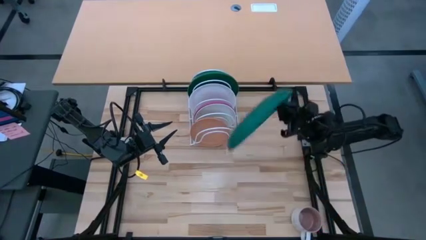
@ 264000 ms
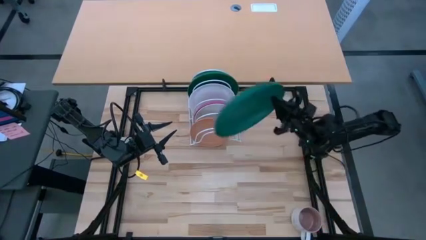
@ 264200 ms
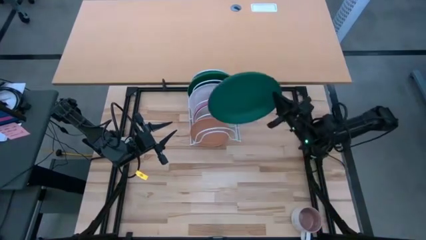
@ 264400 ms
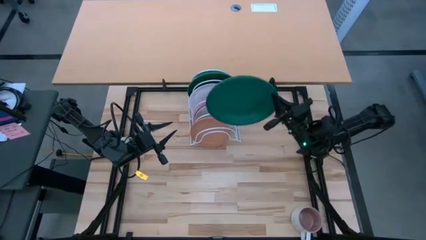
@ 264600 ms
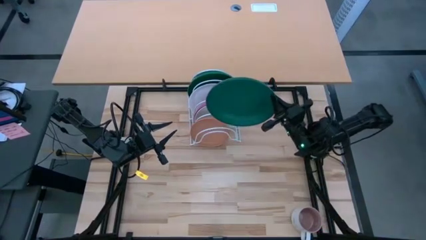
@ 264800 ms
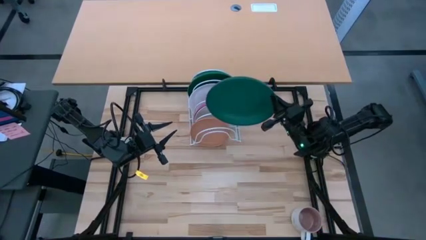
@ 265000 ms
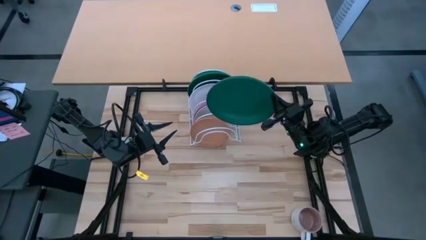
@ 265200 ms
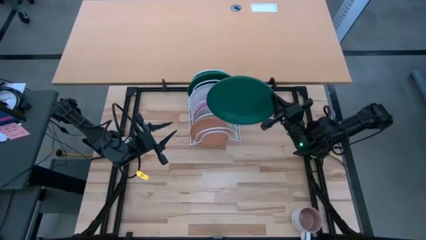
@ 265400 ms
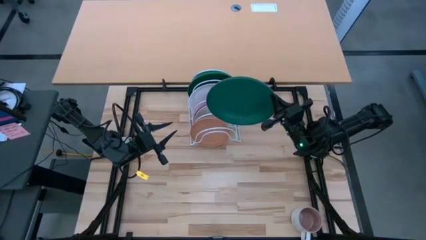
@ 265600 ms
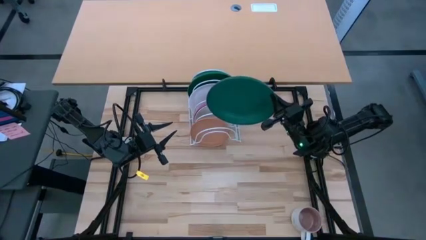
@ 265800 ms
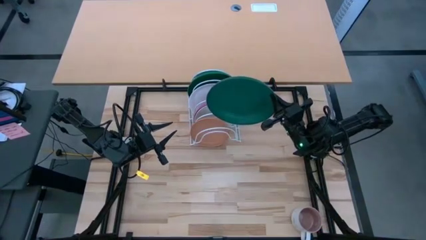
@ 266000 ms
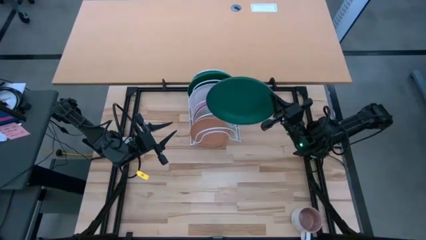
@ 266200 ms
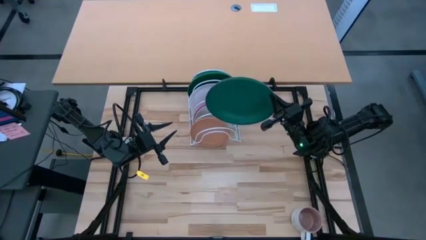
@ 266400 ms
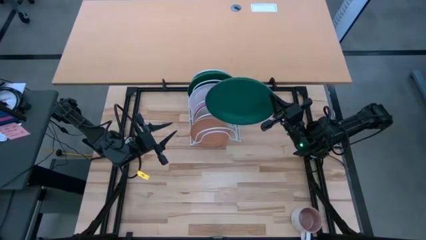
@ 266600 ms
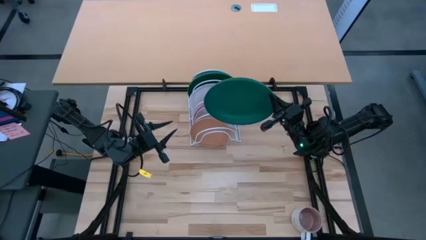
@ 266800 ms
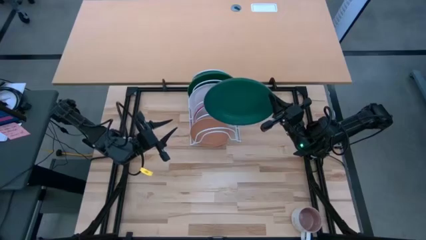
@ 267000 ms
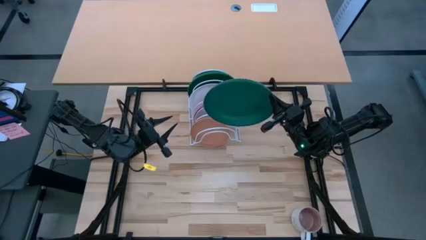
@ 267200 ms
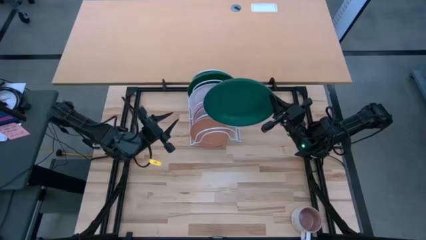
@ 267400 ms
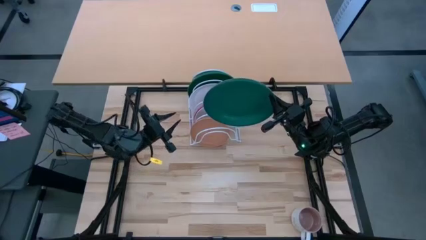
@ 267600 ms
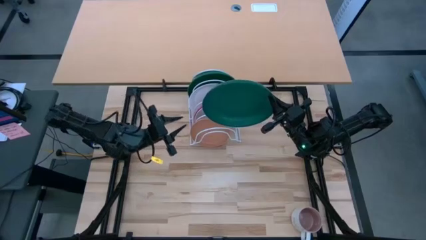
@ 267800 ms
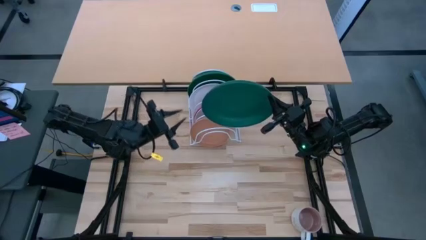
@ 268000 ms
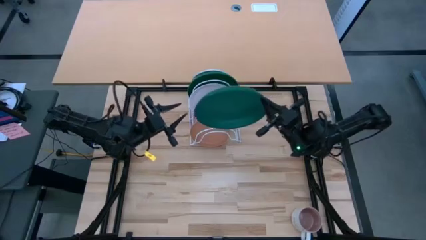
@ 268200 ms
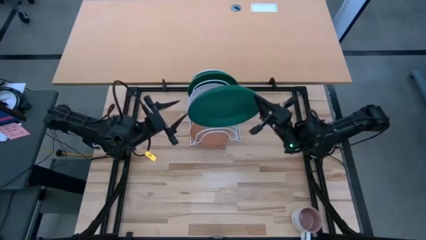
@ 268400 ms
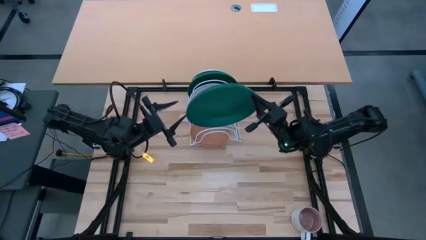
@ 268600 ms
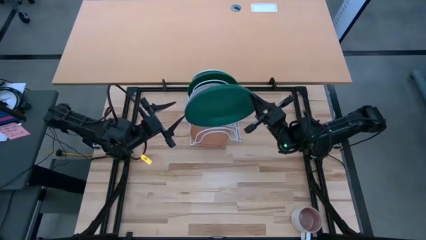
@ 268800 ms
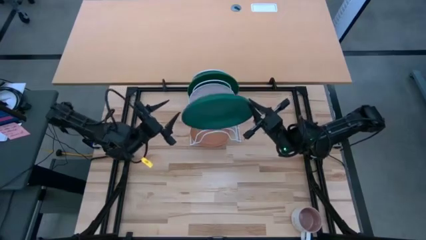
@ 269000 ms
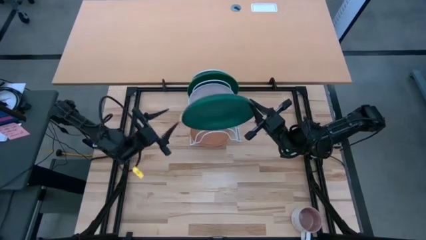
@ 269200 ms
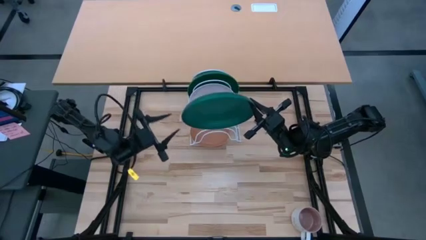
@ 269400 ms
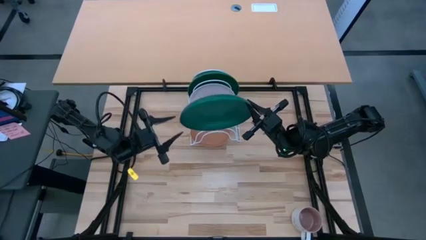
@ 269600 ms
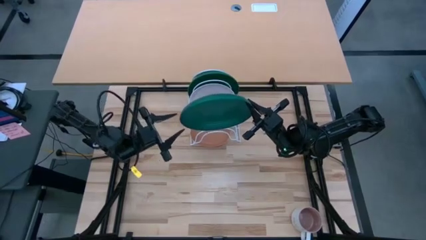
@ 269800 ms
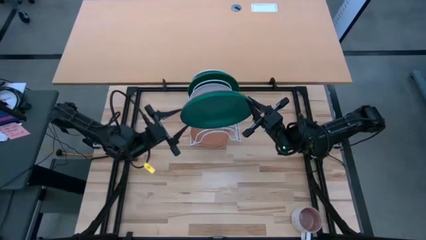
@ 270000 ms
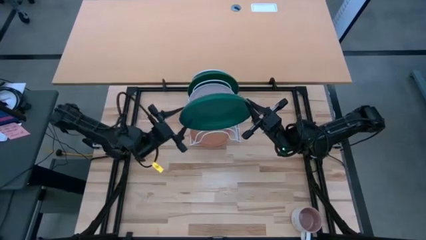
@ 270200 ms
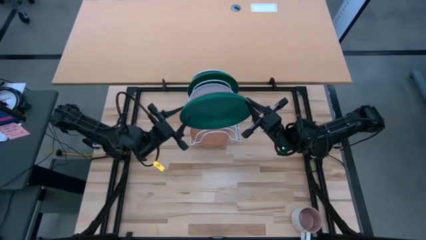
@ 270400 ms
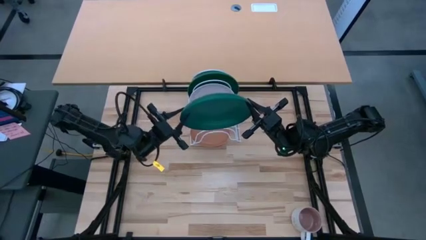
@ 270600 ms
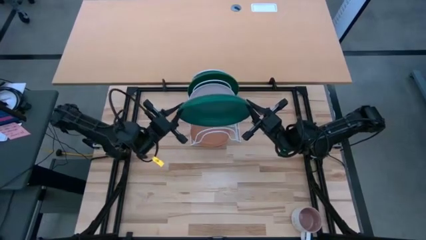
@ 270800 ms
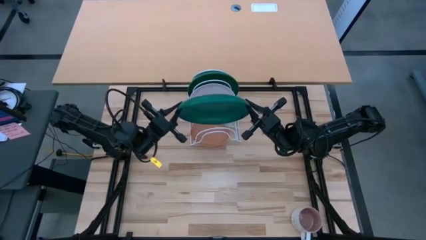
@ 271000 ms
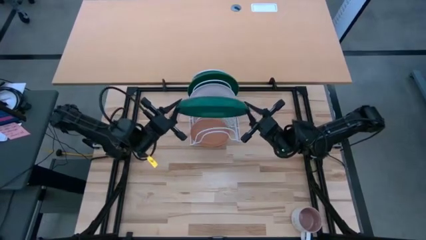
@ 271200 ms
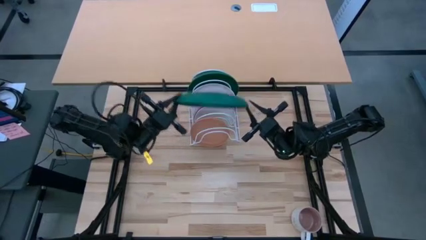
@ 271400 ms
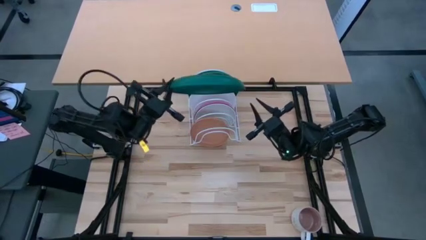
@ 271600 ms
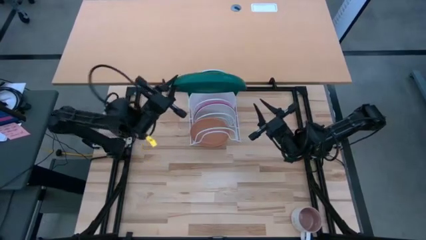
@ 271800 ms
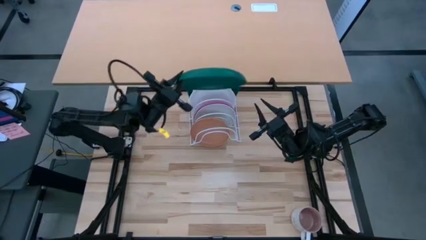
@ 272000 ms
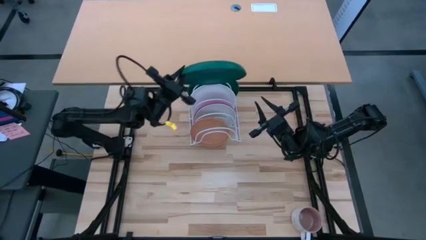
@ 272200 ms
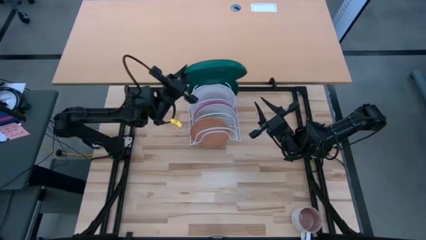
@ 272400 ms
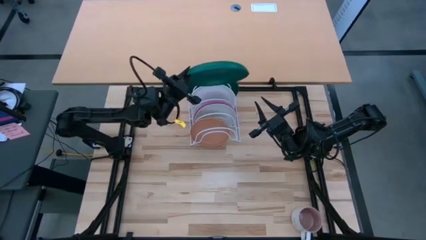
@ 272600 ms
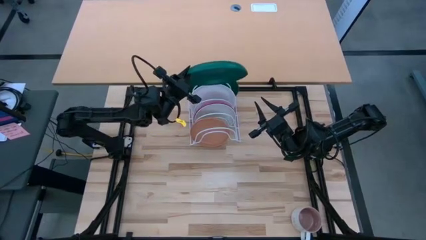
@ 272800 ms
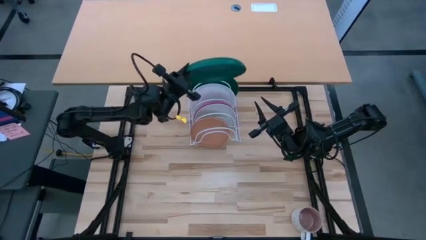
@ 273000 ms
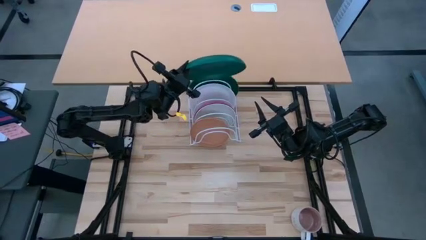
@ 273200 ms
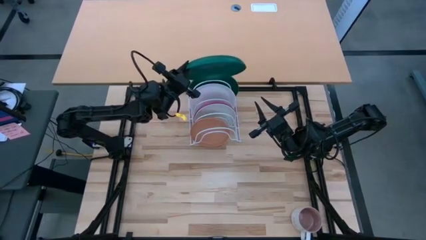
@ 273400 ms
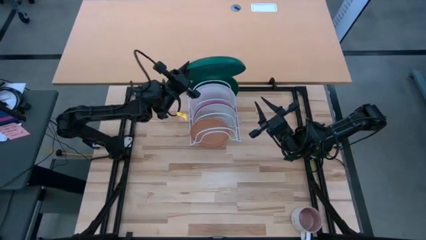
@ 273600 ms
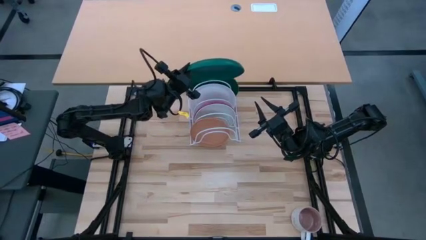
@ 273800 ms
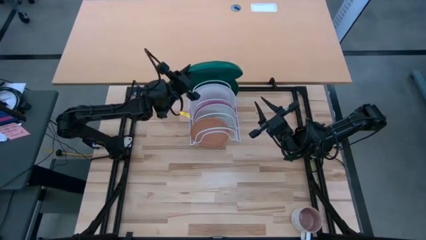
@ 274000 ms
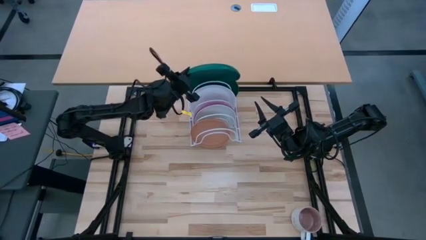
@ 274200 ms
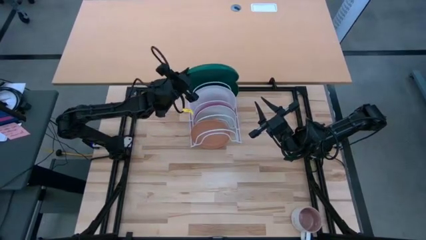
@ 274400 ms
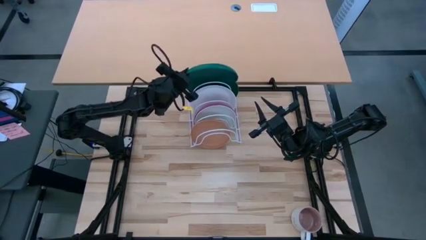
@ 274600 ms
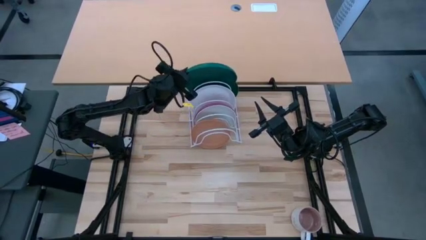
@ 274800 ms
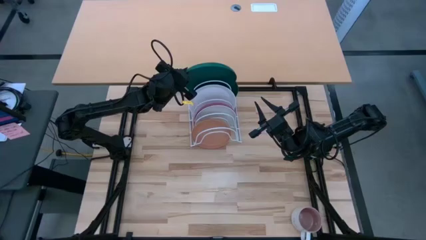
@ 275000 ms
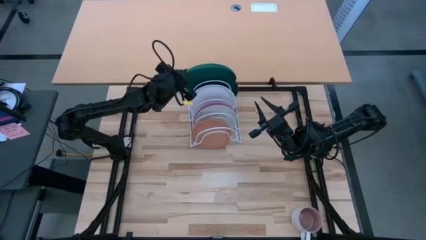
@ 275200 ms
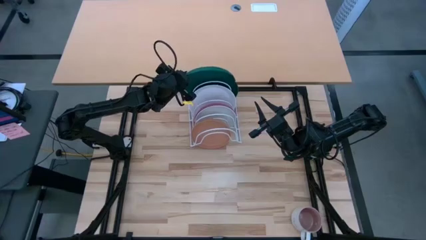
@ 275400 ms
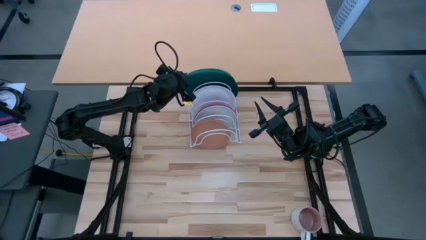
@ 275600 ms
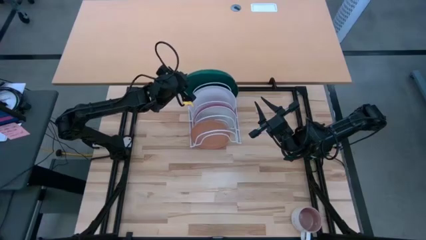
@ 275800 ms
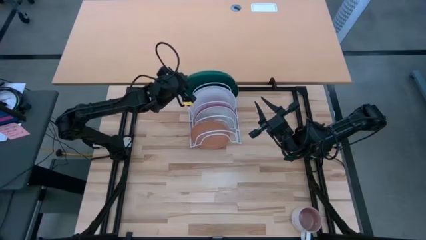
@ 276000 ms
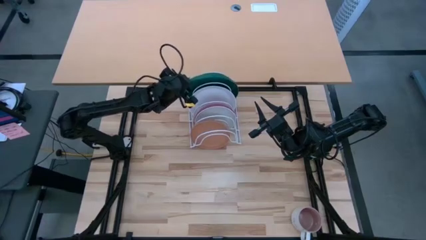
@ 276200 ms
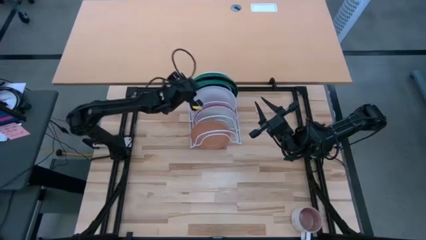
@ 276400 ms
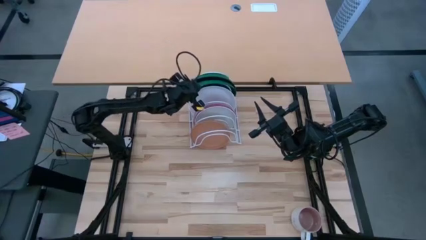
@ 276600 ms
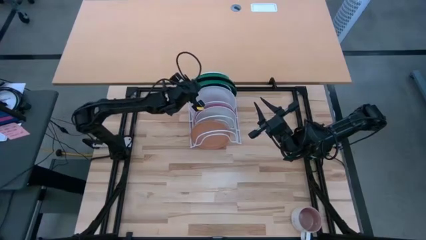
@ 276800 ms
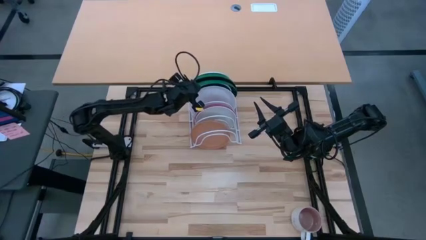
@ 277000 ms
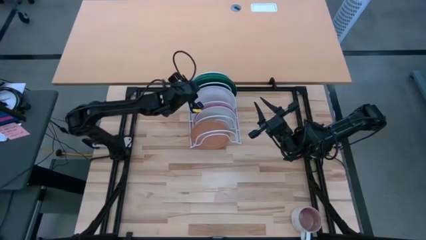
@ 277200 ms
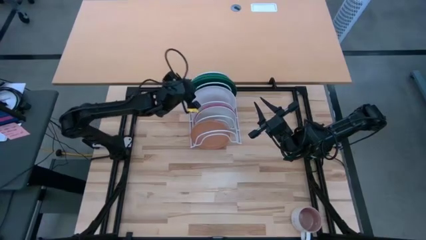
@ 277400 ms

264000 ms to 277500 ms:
Task: Sort dishes
Put the green plate on the dish rack

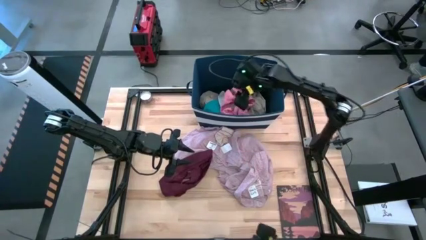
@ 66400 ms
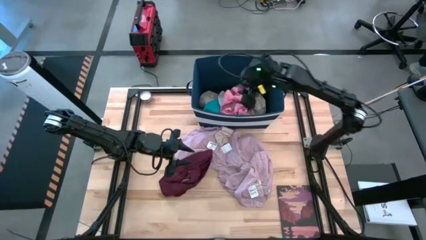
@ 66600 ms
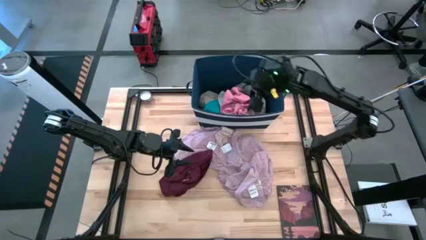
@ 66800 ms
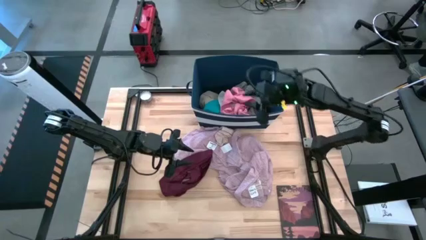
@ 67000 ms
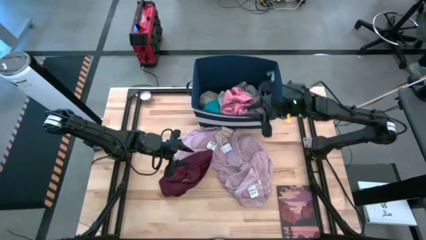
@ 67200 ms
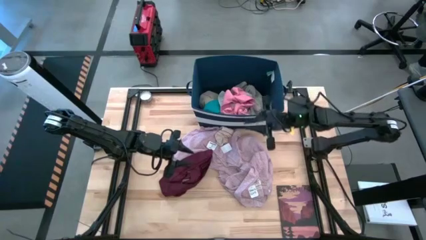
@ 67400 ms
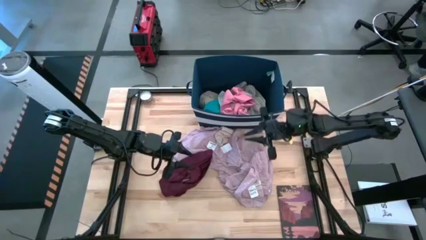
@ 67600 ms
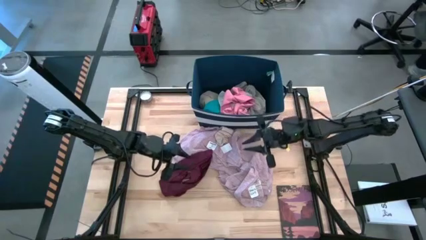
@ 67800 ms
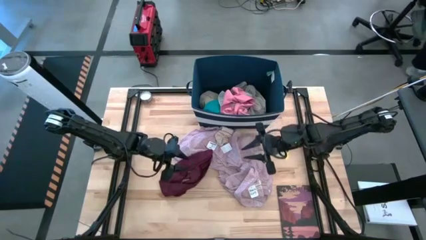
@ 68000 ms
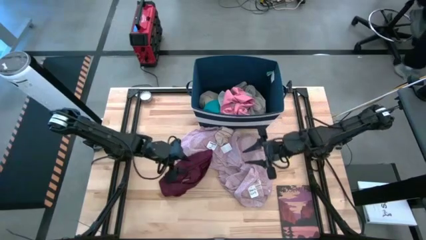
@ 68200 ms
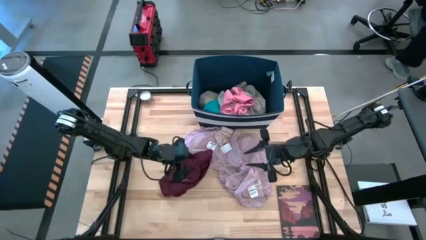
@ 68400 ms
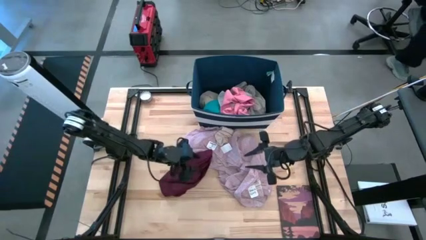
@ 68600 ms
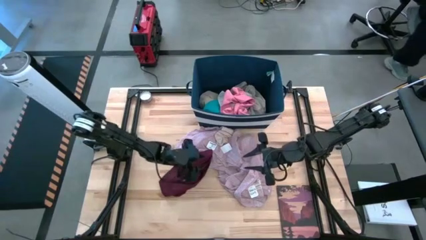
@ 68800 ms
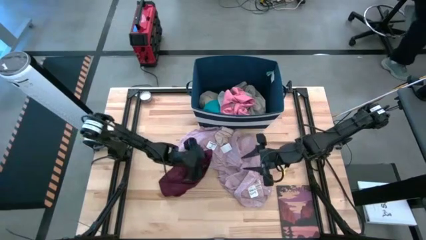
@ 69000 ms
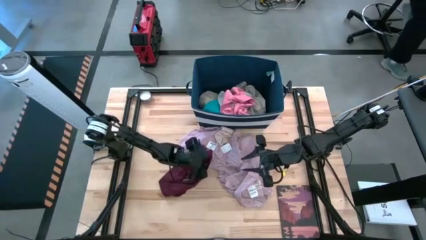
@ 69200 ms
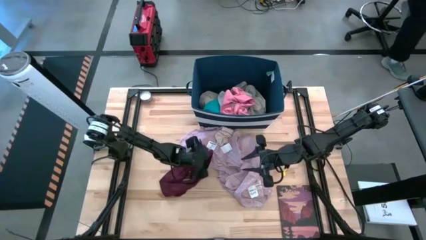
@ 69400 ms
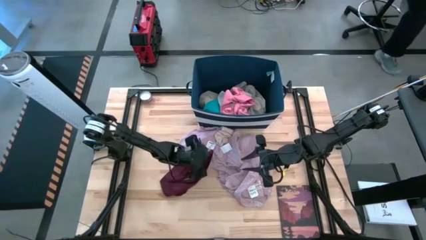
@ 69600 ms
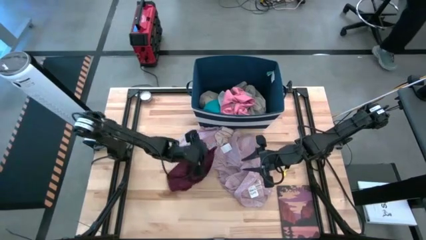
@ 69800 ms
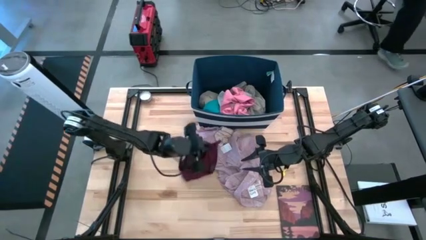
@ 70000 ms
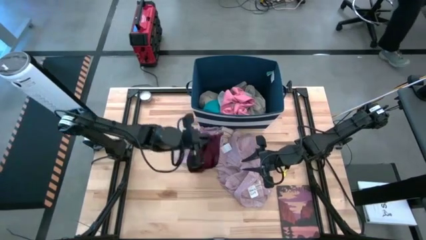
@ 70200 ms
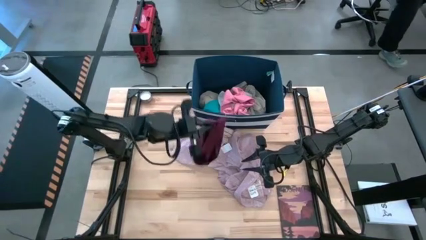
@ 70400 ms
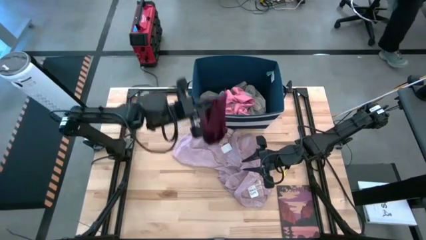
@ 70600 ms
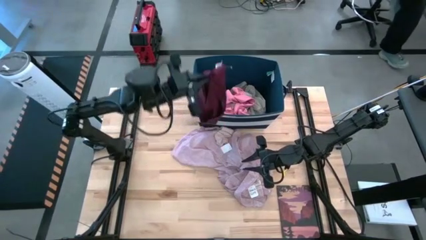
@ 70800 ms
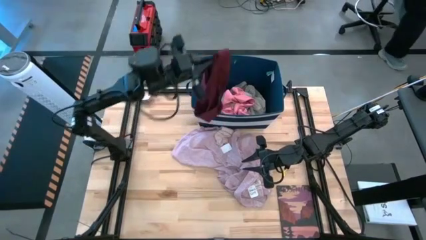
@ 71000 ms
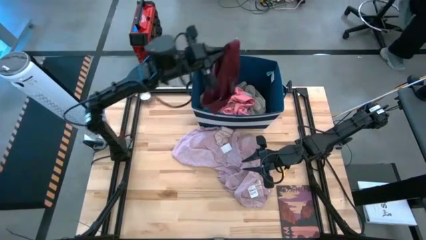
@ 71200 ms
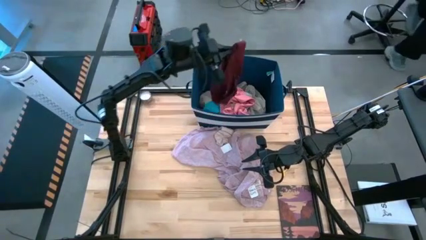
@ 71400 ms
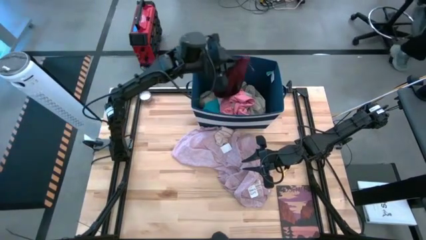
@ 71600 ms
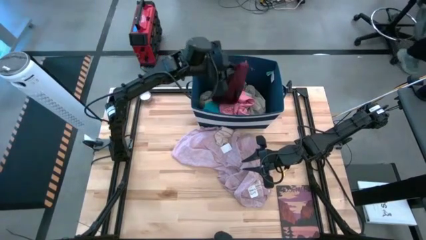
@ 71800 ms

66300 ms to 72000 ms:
Task: Sort clothes
Put the dark red underwear into the blue laundry organizer
